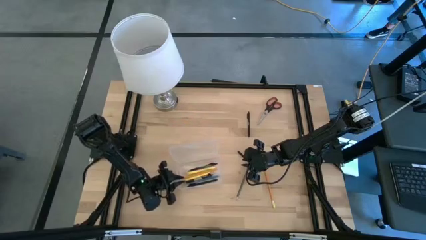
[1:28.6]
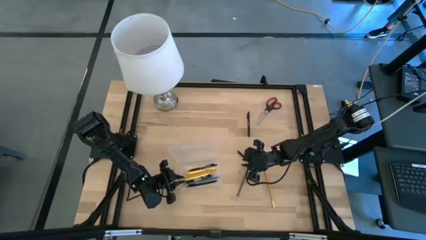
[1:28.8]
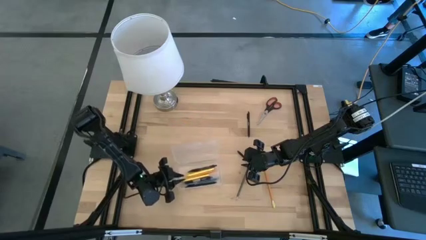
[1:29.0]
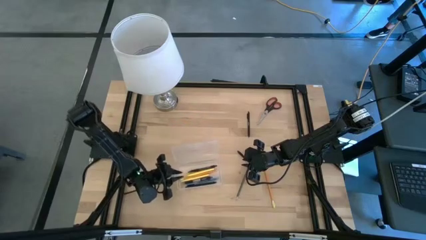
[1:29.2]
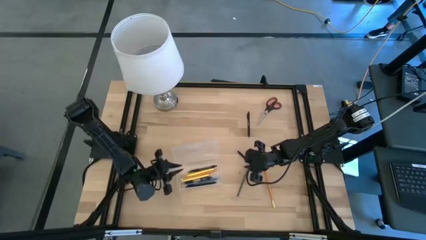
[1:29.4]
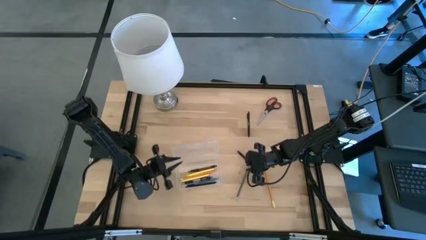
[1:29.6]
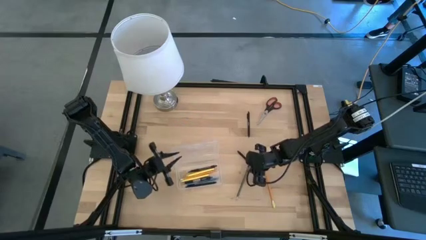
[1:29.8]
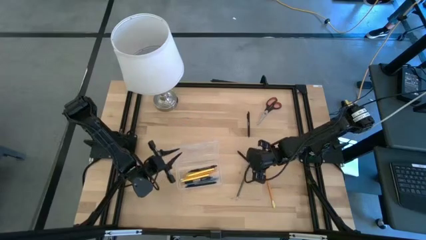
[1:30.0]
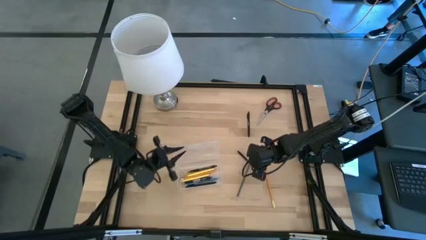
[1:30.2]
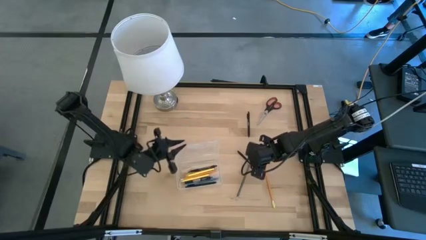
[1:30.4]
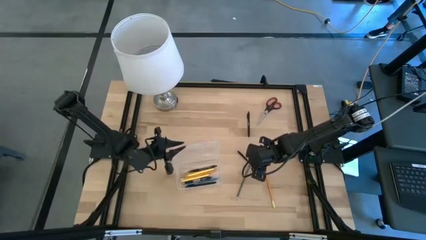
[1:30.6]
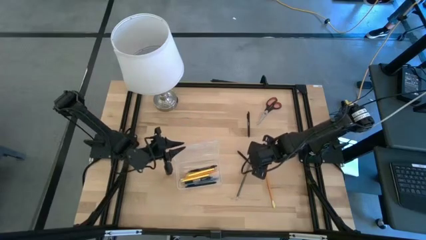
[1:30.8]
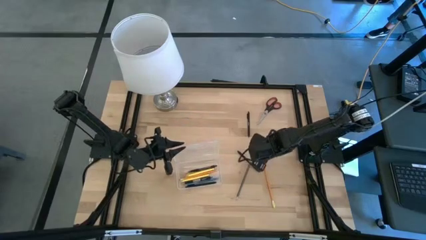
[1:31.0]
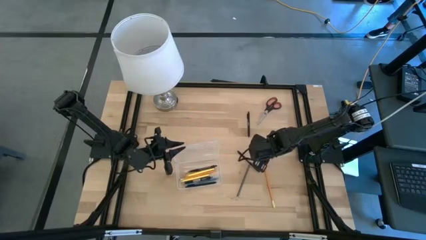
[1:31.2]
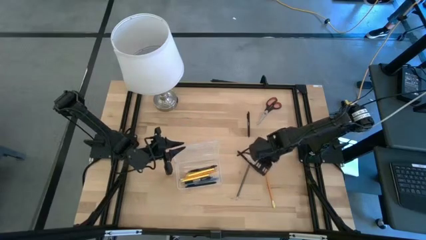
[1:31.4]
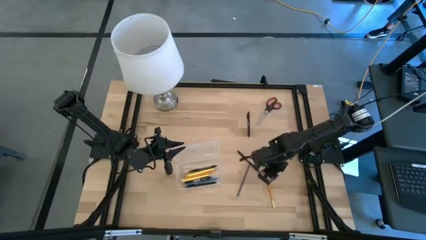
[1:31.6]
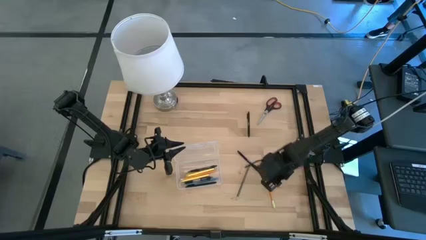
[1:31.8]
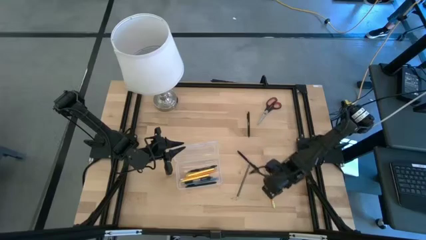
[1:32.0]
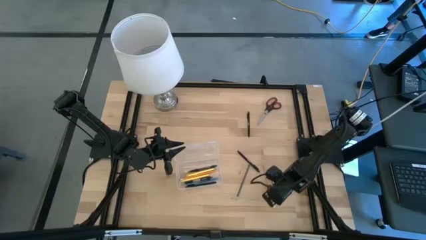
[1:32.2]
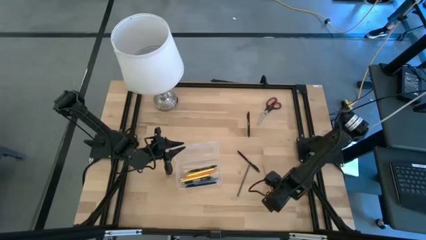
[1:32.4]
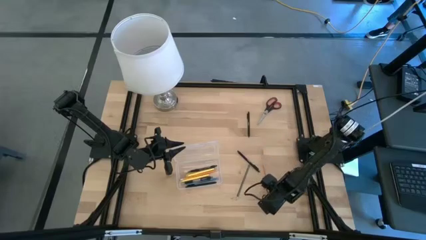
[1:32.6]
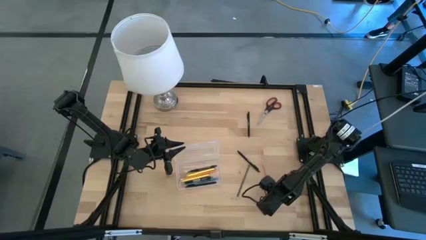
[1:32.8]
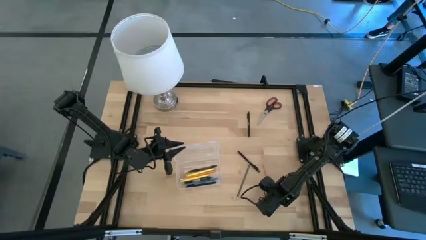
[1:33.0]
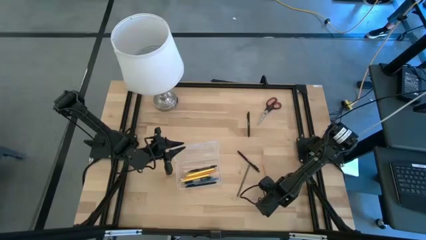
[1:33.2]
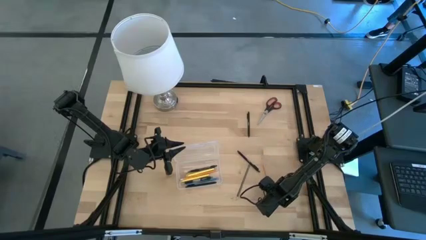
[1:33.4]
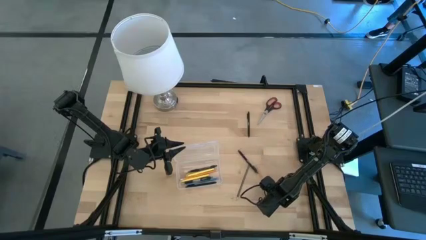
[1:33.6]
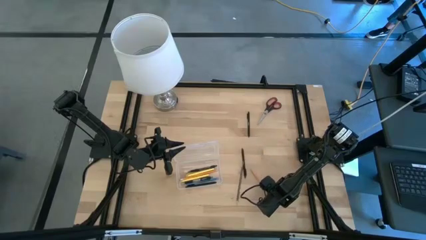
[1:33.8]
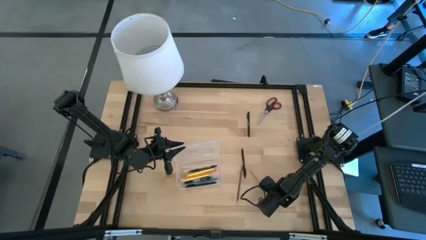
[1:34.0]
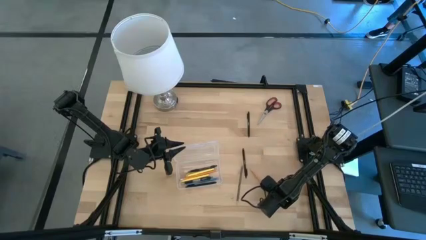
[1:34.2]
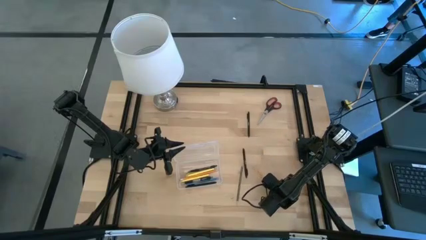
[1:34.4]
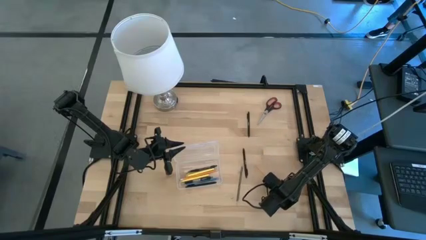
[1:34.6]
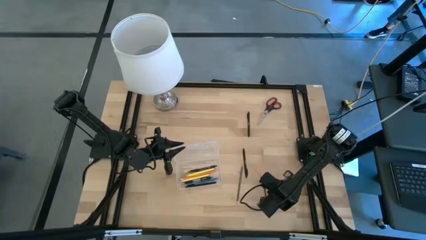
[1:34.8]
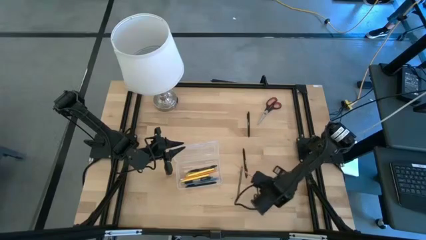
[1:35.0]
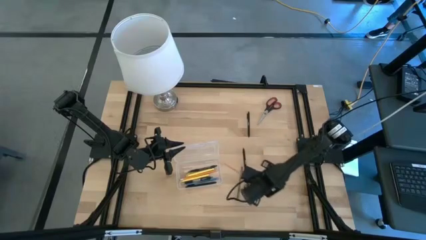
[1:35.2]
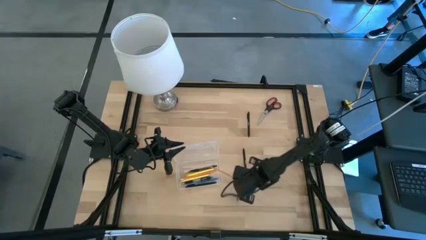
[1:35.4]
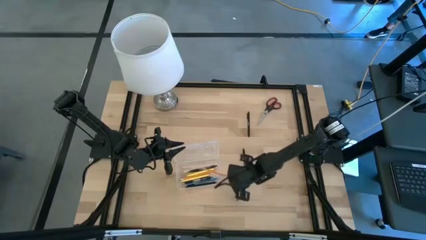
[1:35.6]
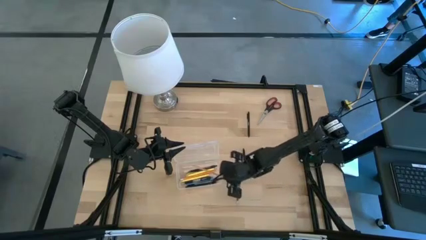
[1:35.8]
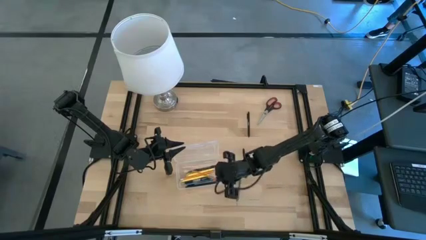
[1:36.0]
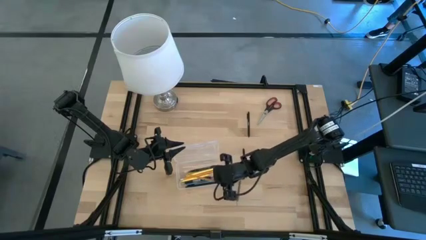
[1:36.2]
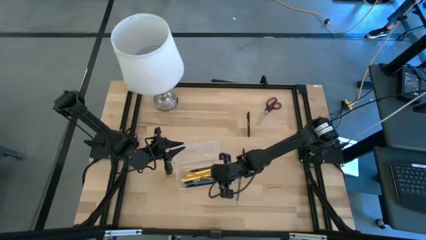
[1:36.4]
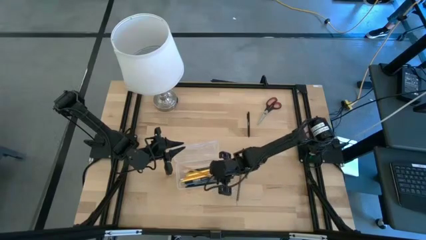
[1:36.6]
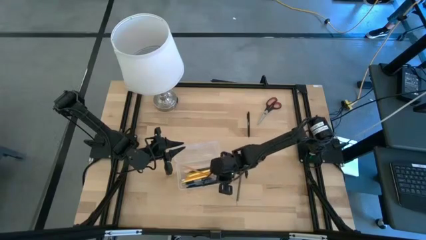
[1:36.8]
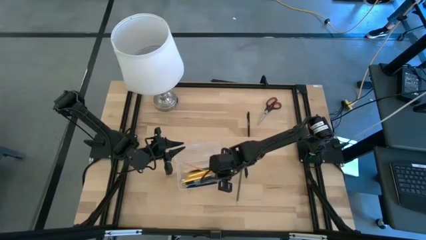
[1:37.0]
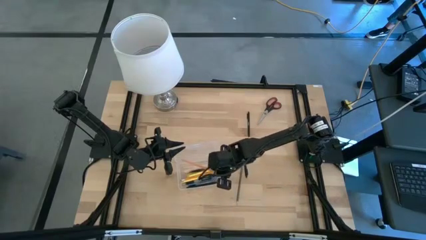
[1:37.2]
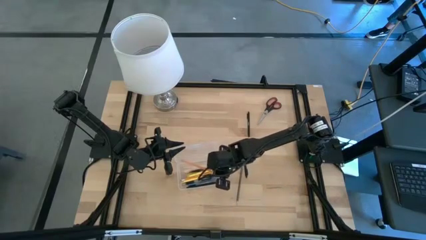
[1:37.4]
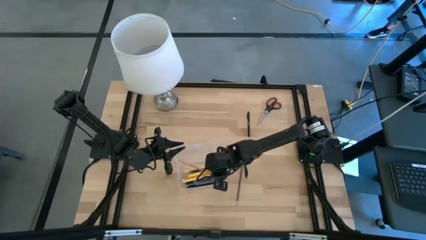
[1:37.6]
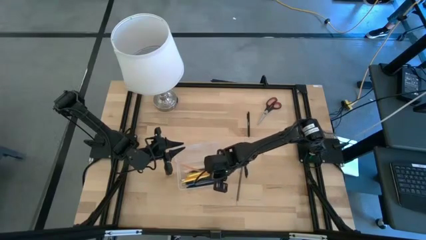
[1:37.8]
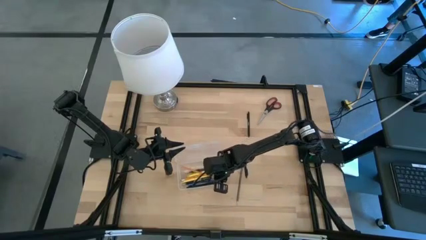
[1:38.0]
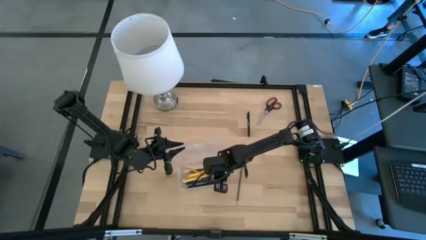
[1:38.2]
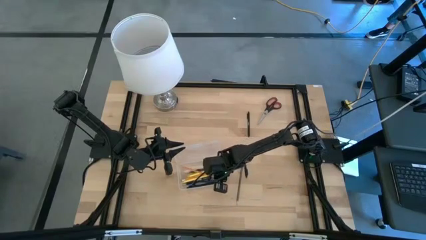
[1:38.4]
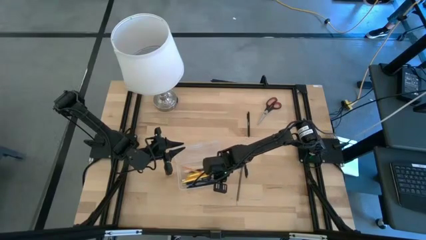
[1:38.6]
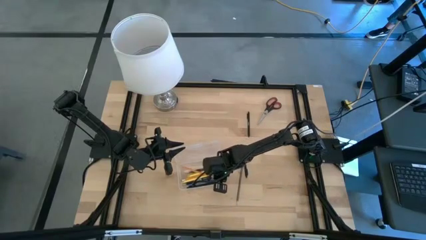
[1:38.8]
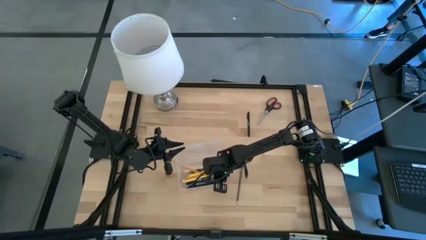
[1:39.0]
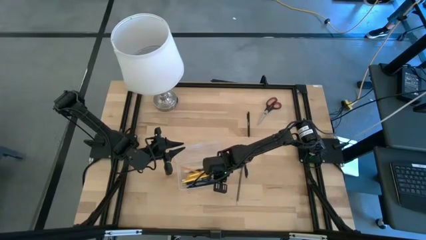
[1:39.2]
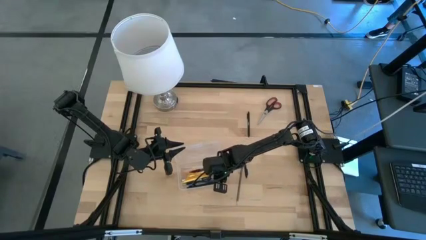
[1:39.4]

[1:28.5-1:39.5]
Task: Pick & place school supplies into a supply box
Put the orange pencil into the transparent supply box

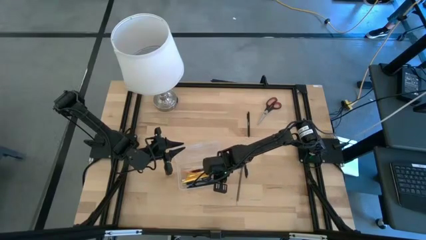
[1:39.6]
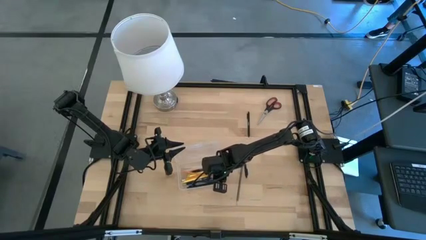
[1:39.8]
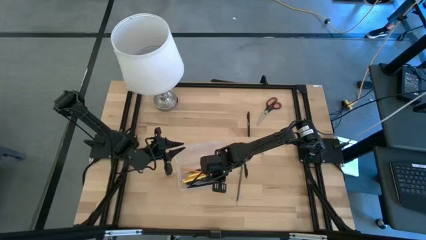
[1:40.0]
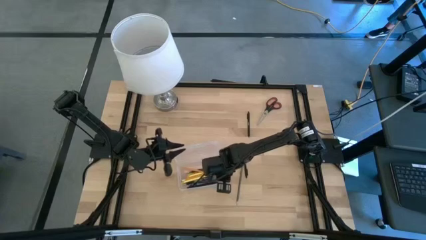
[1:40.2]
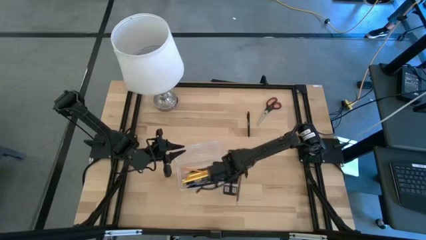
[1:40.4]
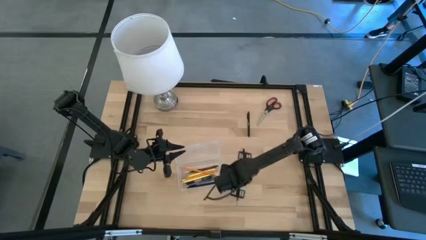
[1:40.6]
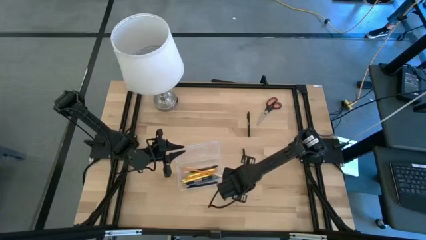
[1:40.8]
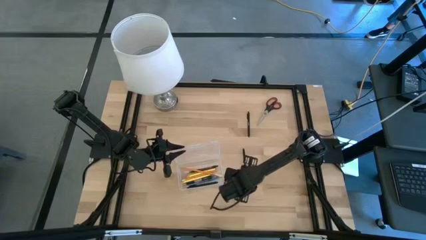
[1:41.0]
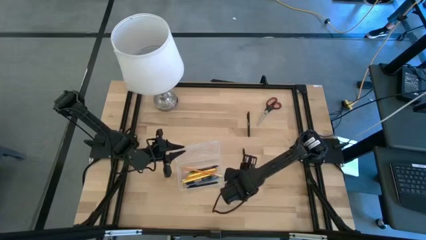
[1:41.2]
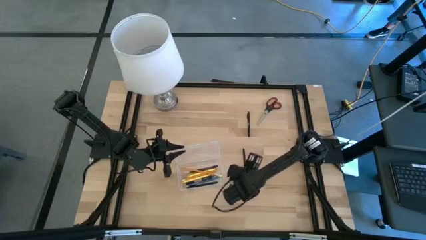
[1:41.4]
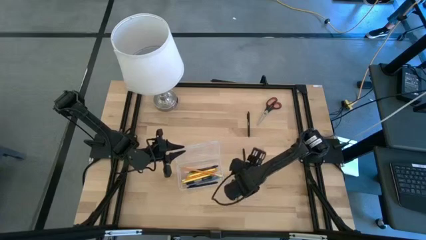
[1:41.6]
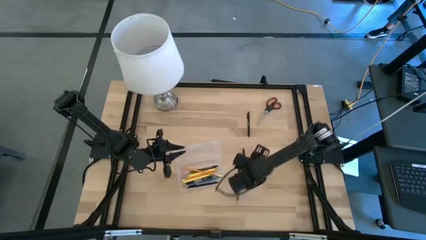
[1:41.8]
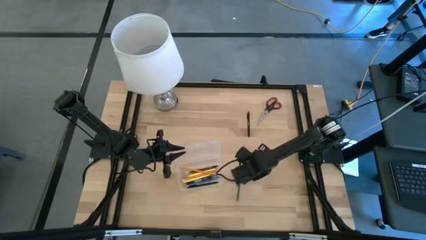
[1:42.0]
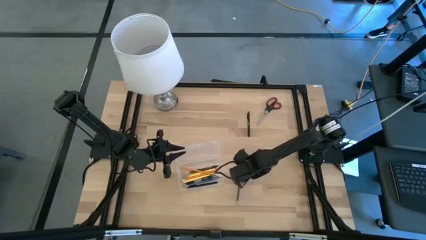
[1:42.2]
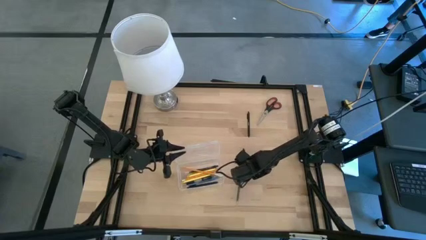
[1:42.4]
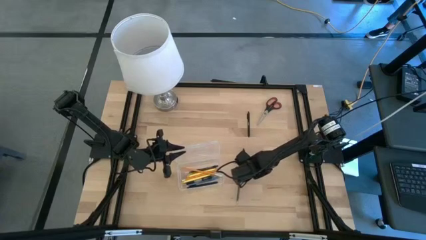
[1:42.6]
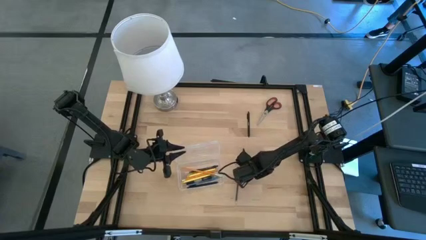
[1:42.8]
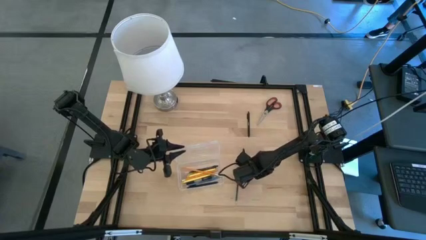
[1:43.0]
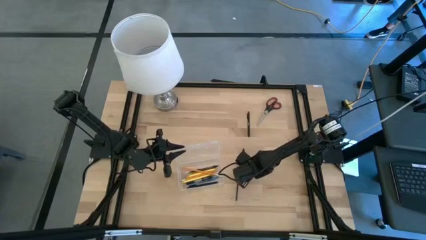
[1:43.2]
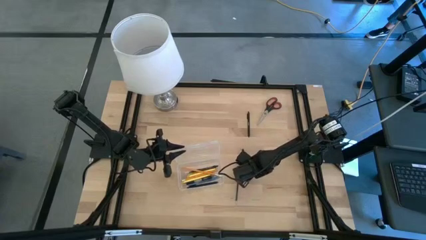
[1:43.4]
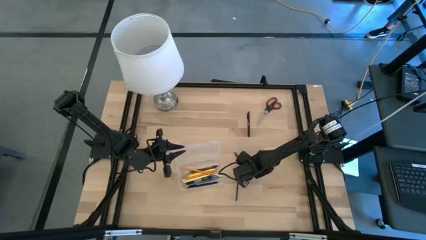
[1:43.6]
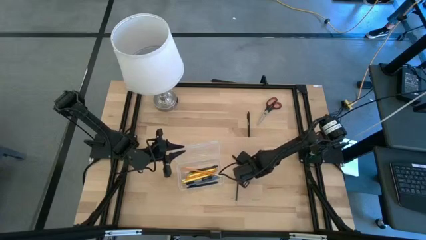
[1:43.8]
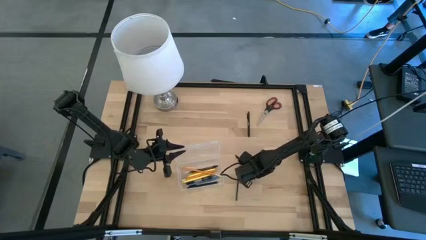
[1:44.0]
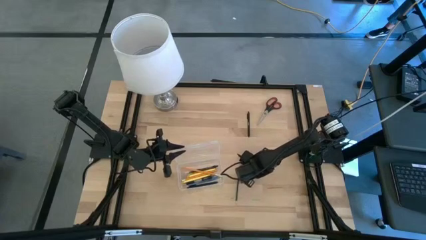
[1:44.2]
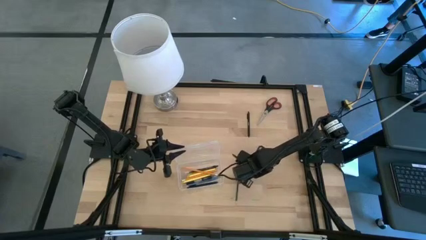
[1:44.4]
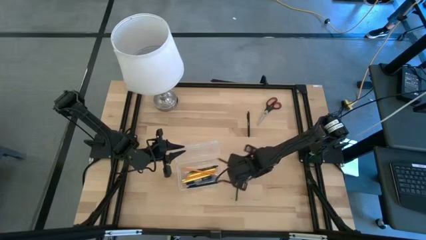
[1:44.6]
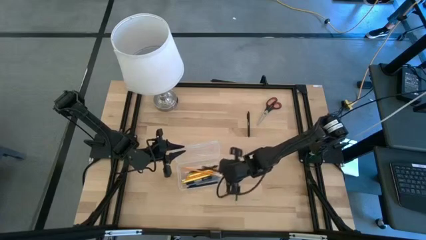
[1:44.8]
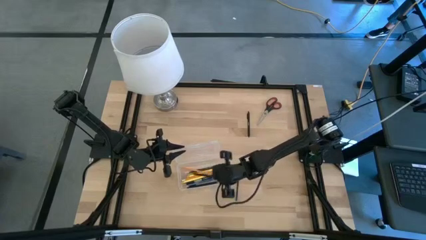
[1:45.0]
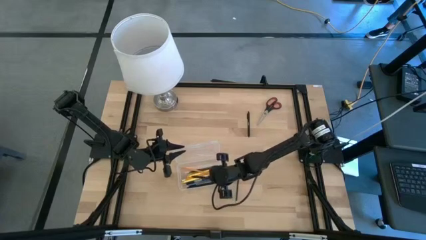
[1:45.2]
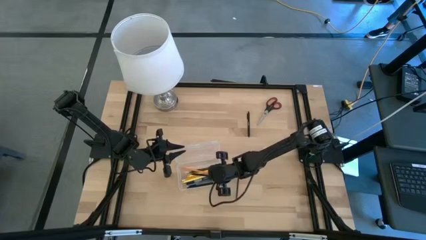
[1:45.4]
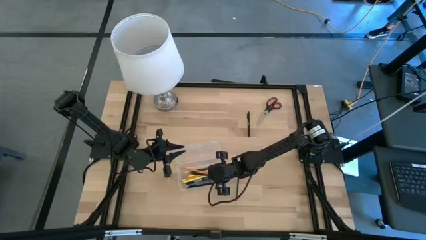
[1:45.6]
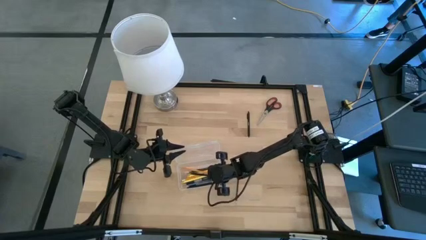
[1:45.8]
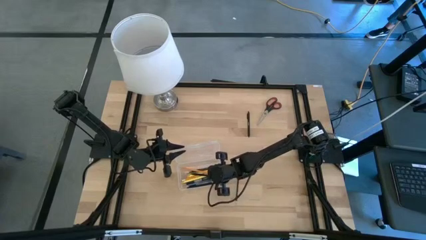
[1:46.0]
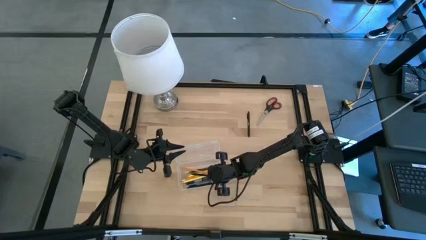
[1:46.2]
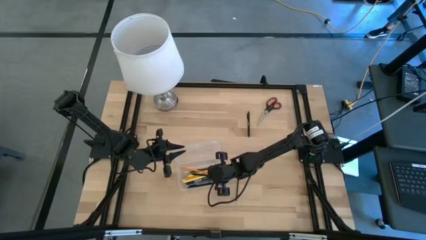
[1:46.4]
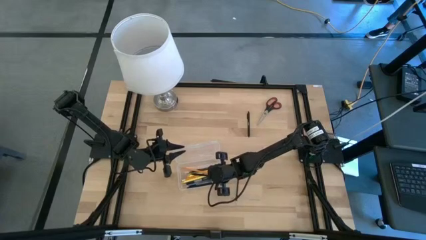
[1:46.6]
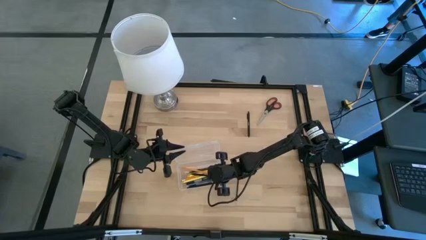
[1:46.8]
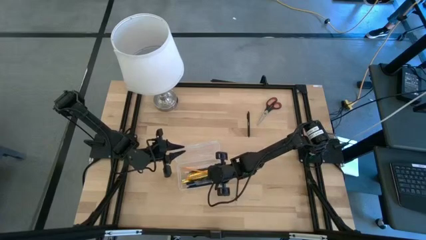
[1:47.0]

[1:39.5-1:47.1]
Put the bottom black pen into the transparent supply box
